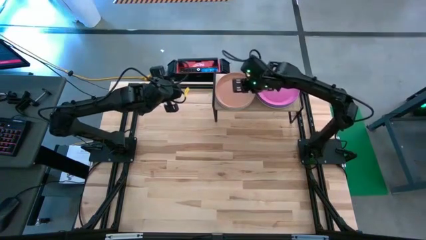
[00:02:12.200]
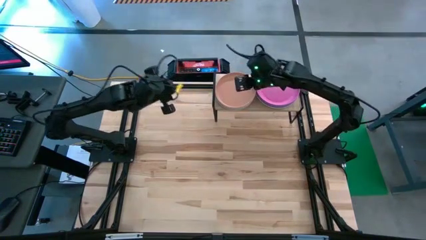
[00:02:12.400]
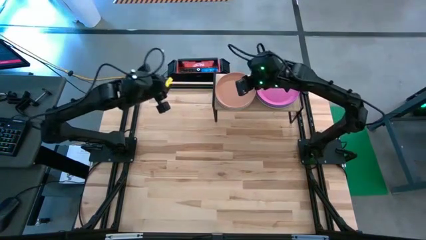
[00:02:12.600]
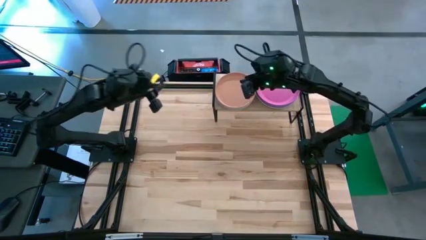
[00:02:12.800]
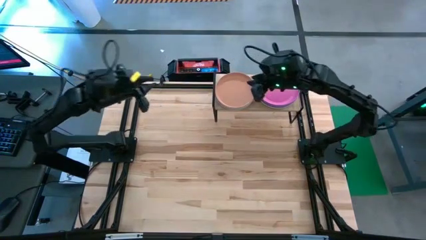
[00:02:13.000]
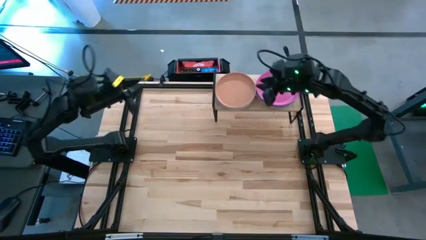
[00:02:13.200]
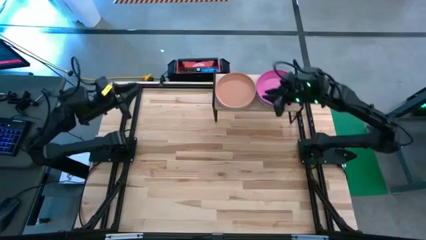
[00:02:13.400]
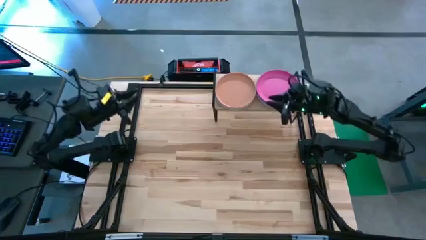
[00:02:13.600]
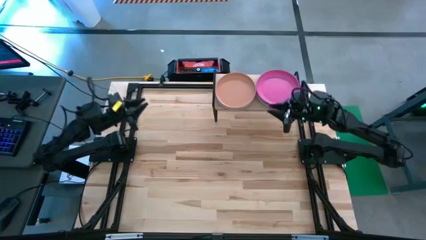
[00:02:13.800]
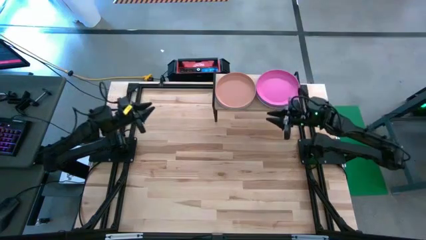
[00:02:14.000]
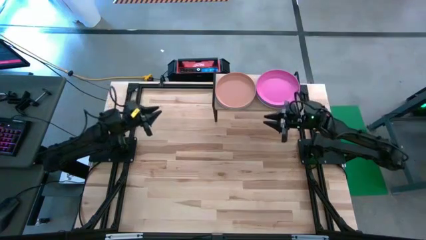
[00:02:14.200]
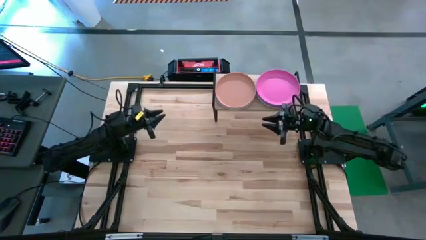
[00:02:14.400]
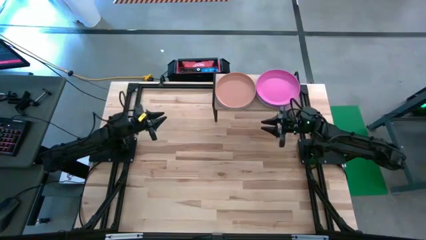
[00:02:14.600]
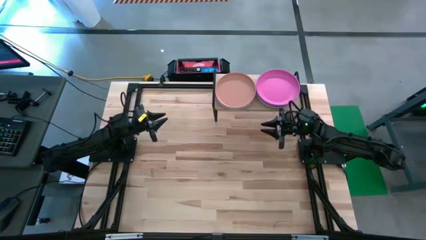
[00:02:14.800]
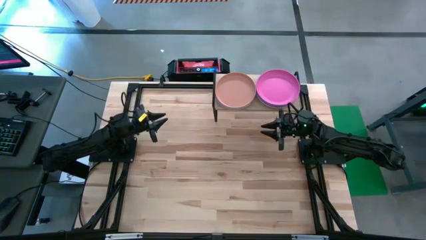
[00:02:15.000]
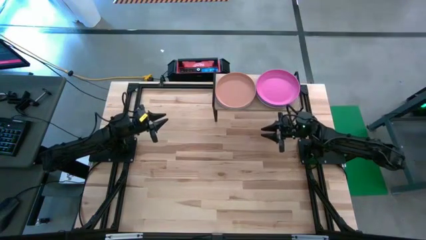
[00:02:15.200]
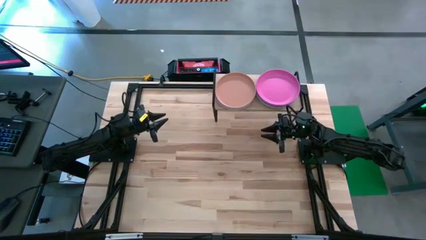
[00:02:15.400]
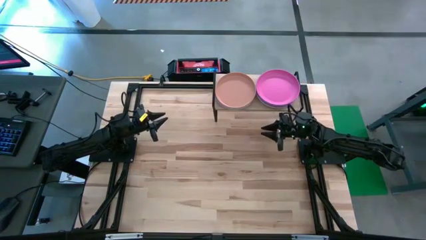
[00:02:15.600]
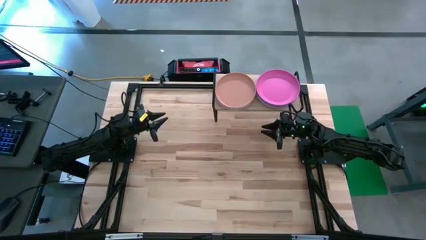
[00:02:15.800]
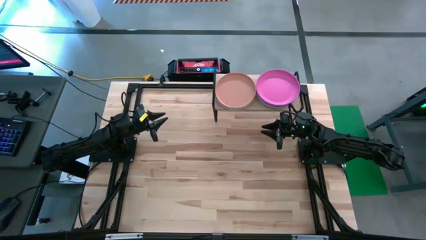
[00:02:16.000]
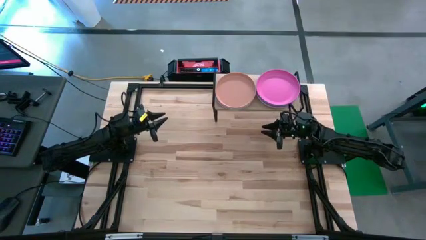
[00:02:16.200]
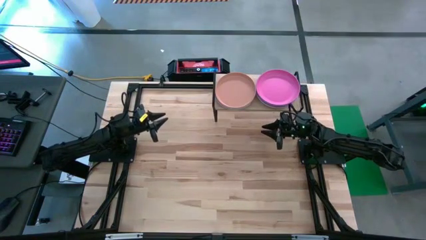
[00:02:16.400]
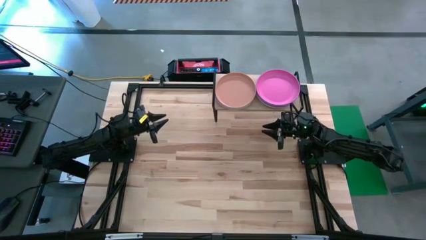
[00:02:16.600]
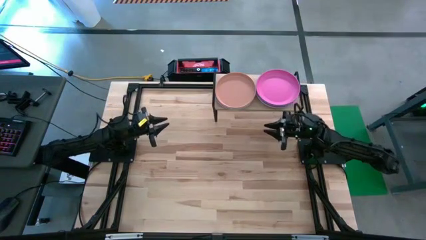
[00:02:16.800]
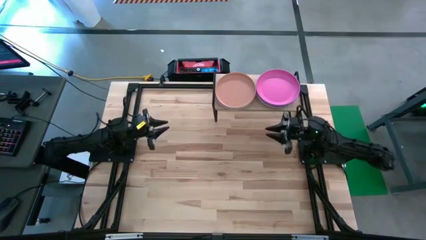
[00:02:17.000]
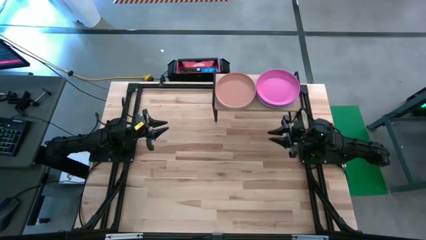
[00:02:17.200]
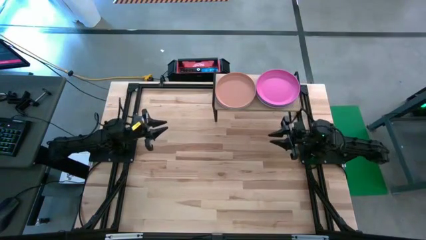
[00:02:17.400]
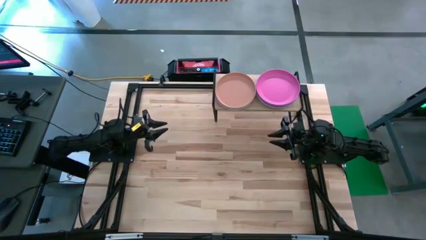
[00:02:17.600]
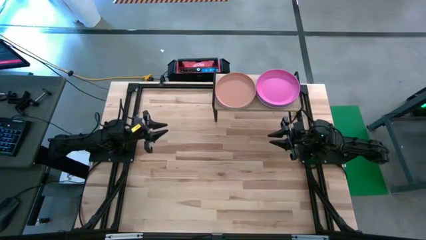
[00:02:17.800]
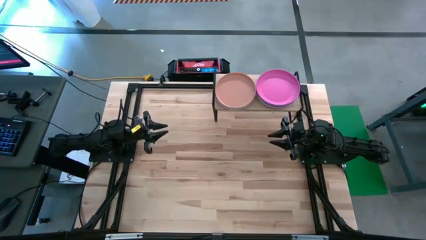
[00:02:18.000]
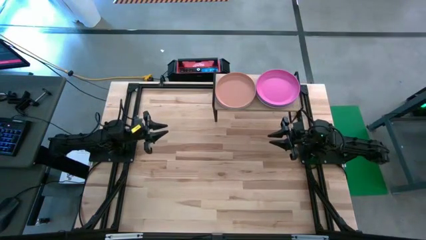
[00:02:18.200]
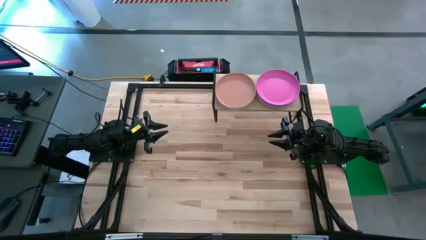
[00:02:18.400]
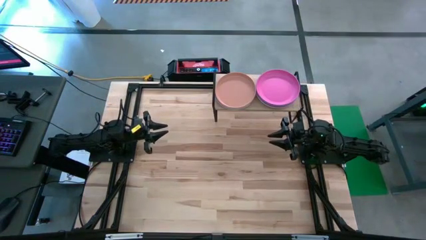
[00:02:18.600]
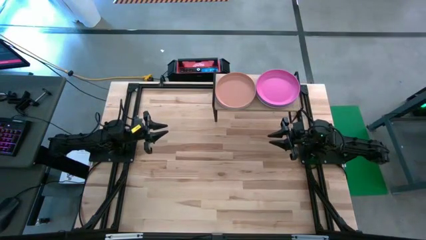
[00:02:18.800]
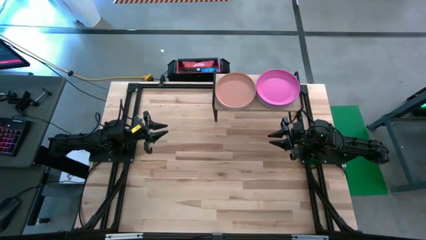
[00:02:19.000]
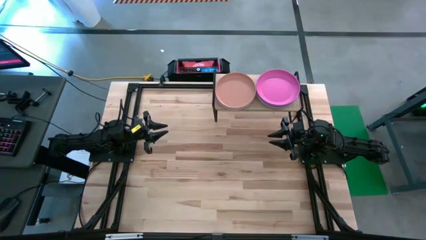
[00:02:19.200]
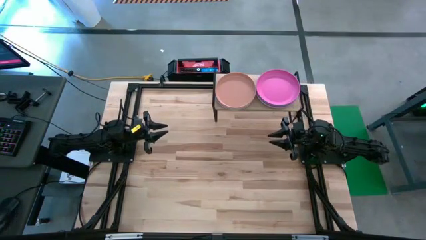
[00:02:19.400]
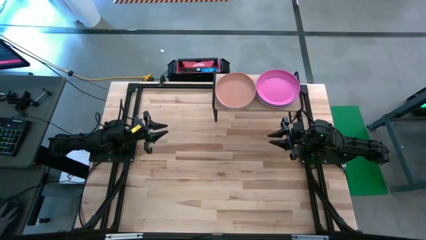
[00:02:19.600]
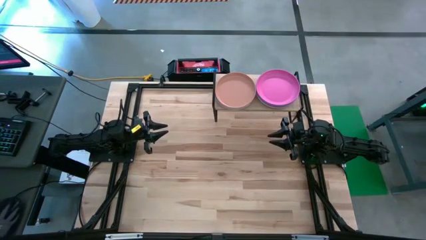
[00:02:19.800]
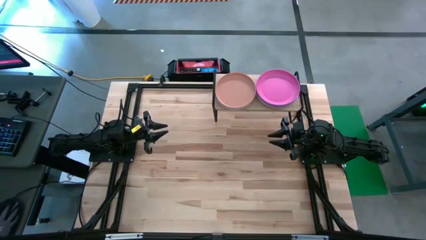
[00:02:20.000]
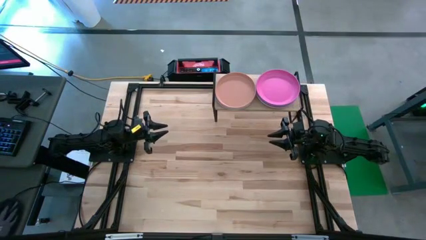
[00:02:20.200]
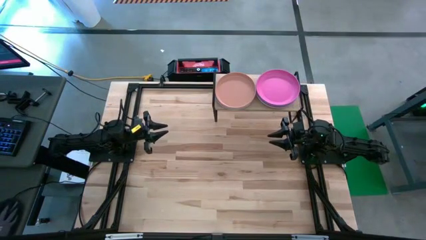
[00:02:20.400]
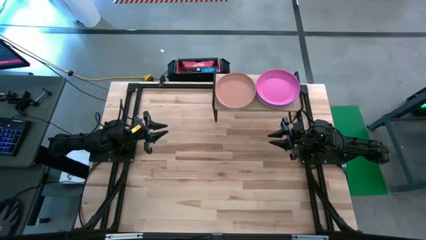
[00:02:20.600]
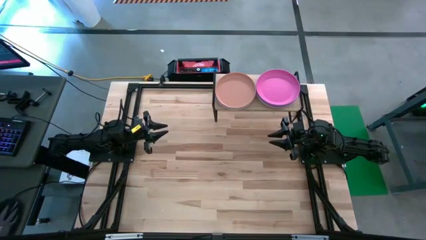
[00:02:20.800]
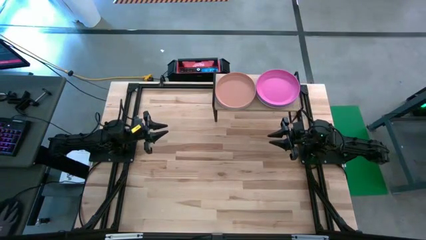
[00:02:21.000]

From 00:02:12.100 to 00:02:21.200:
Task: Place and stack plates onto a shelf
Return to Home Position

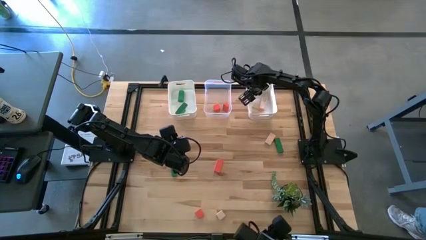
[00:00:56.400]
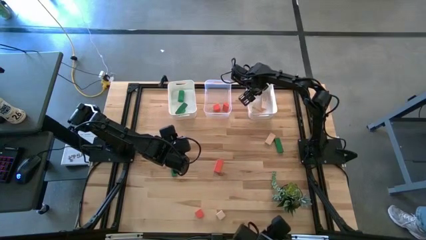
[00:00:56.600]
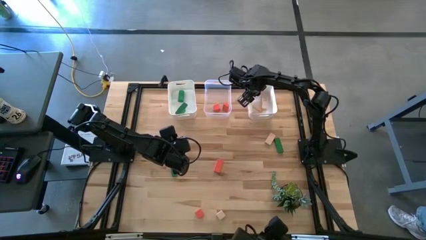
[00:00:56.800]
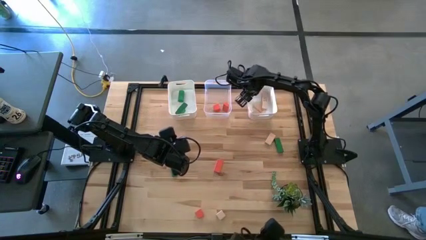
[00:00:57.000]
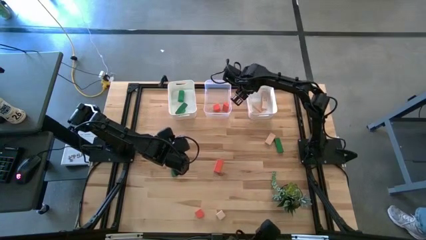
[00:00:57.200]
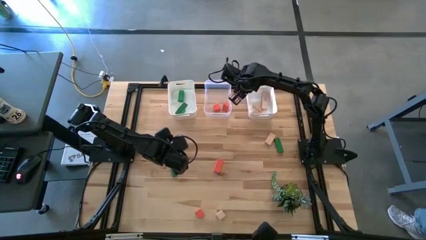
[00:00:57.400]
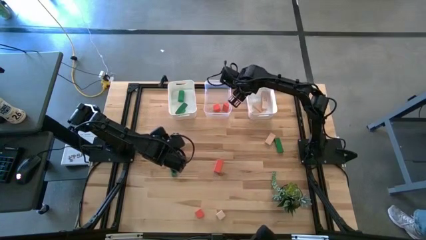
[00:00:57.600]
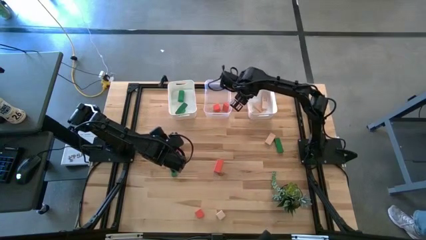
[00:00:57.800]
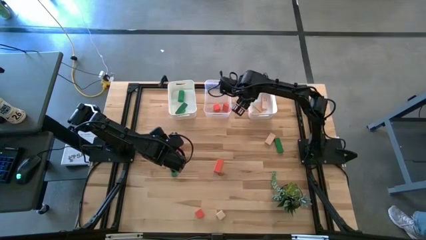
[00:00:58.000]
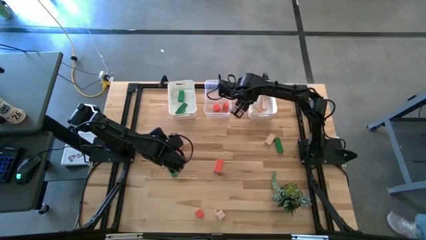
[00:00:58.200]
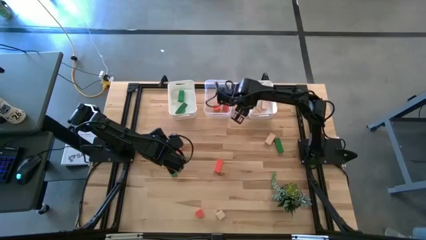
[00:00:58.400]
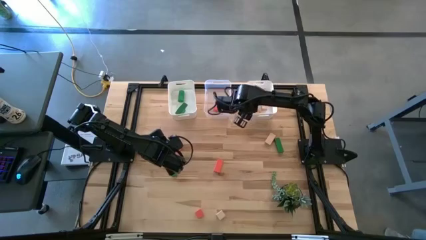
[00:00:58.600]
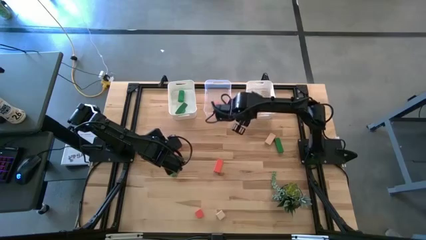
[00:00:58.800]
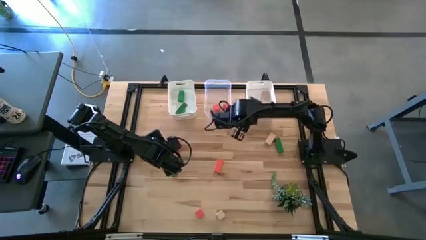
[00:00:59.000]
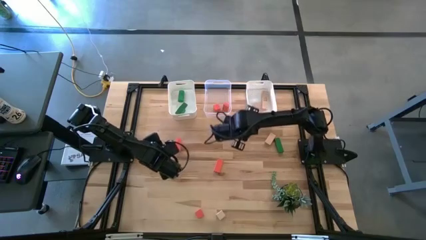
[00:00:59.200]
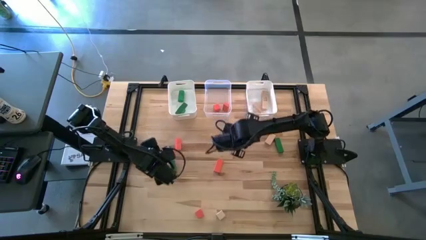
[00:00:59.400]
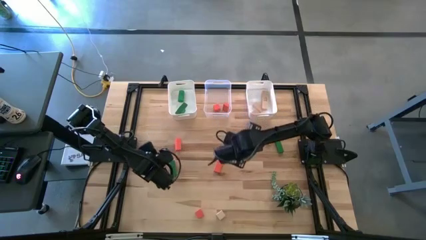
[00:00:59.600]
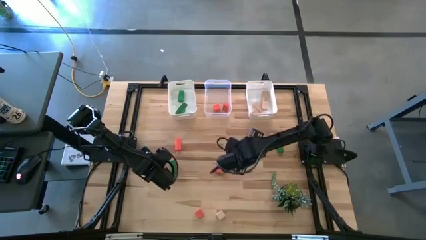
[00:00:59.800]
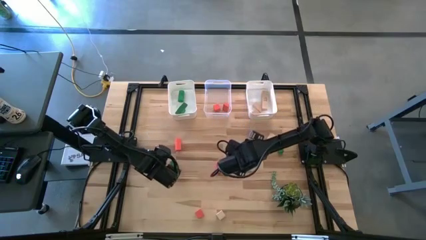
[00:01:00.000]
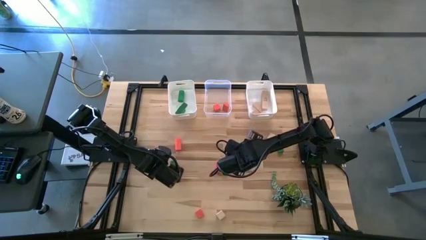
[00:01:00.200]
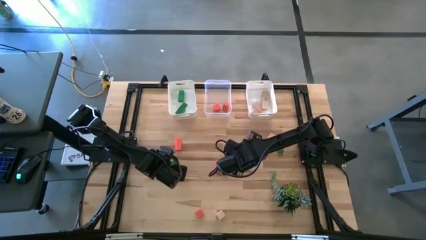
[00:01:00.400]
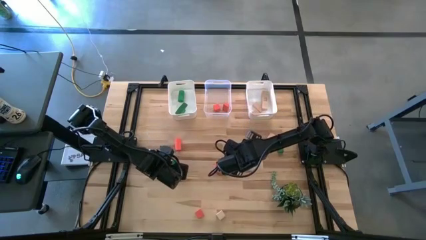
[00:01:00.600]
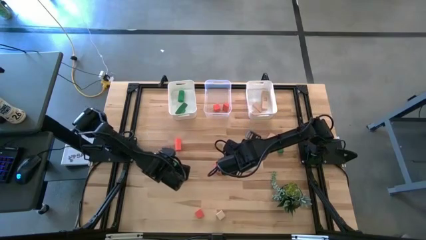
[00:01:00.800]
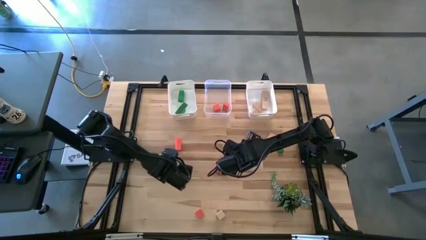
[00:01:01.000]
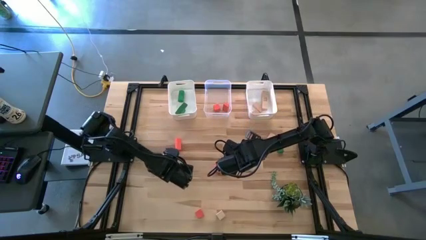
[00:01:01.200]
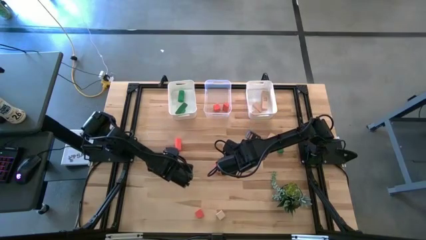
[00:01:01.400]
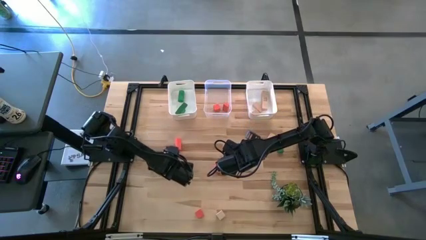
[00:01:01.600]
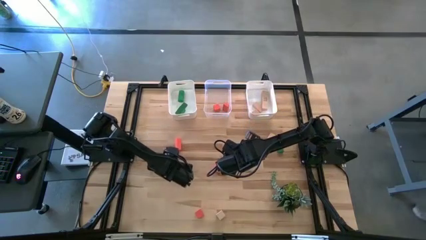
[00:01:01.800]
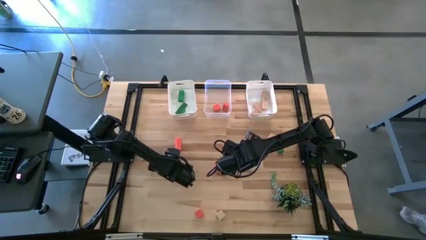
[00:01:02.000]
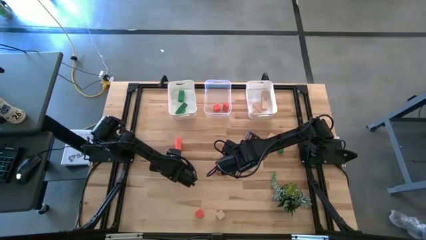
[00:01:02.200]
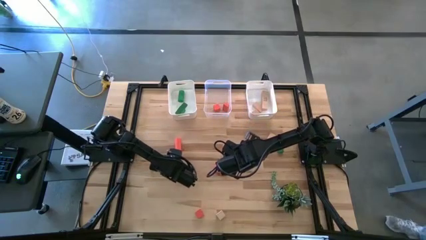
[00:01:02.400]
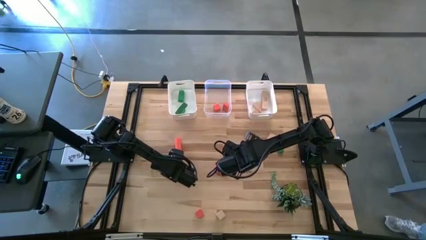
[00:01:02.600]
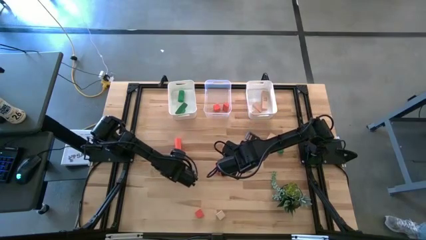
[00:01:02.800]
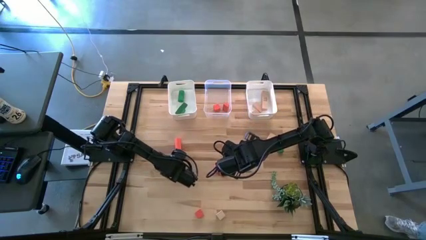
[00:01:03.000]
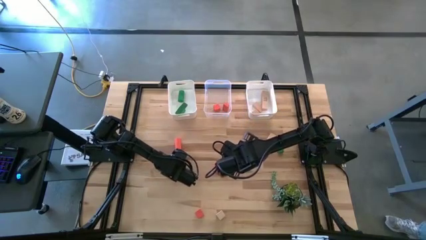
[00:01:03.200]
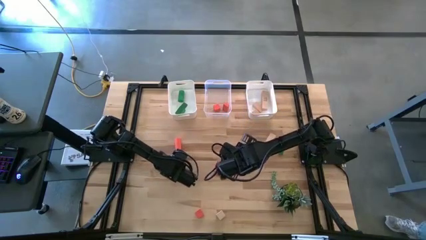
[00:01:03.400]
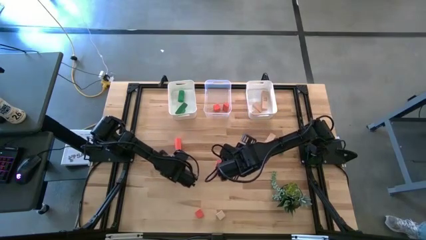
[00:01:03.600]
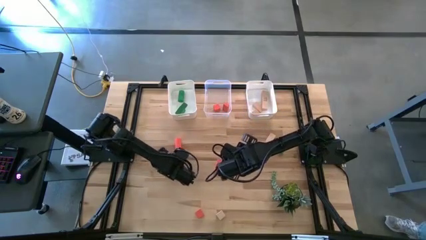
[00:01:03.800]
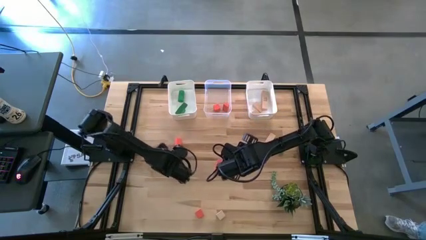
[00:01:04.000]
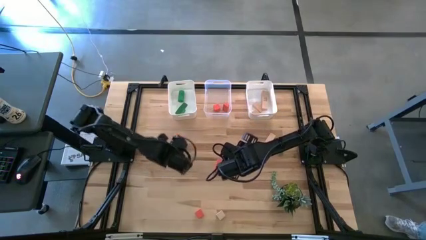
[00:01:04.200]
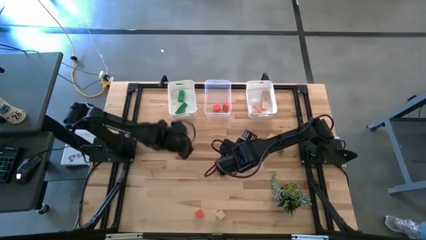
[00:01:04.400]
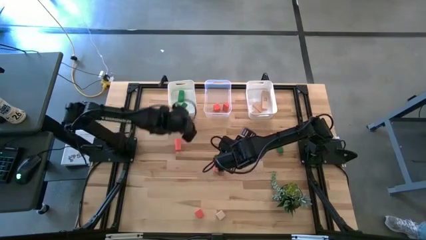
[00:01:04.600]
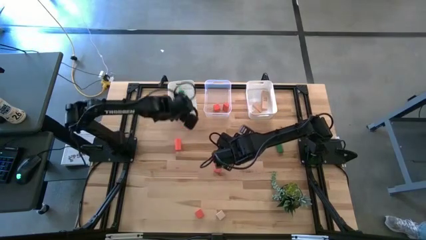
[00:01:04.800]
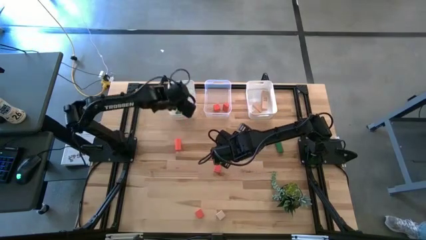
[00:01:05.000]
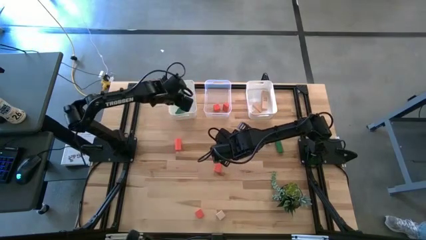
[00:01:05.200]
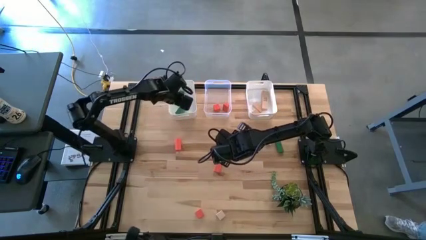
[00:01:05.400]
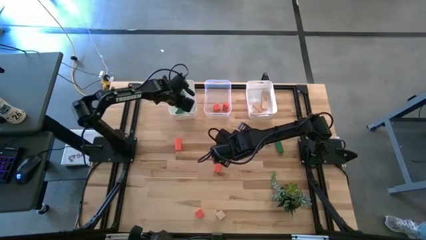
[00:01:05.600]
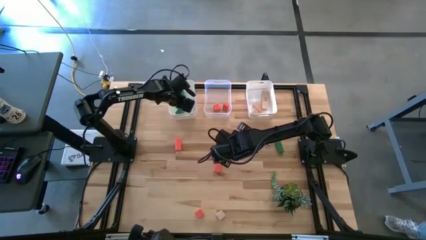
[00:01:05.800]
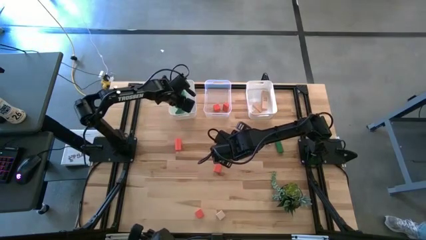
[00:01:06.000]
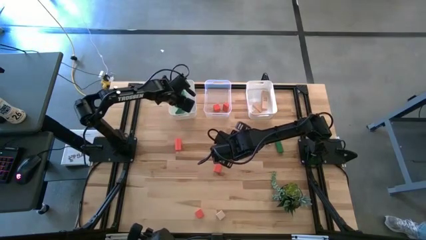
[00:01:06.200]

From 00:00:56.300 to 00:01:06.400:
Task: Sort & place blocks by color
Put the green block into the left white bin
